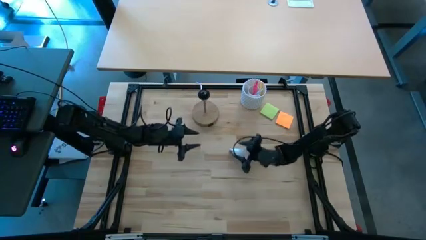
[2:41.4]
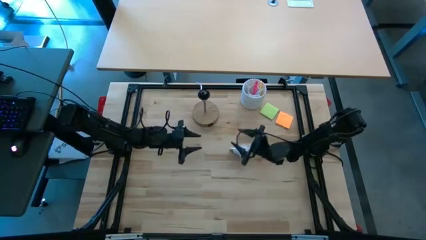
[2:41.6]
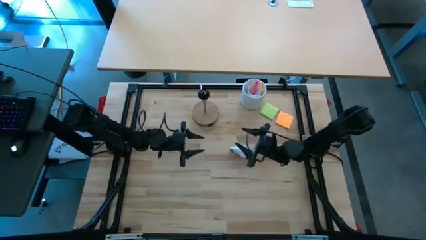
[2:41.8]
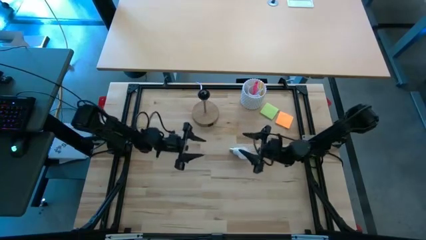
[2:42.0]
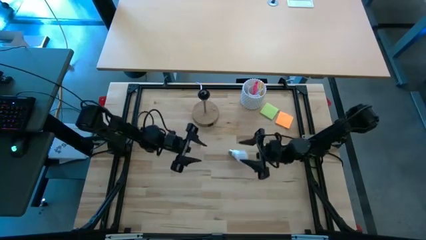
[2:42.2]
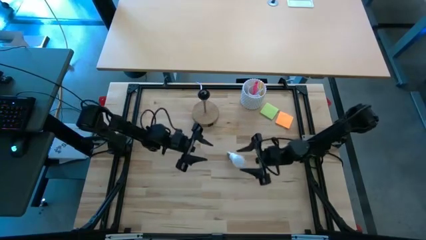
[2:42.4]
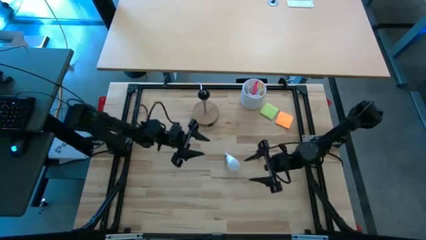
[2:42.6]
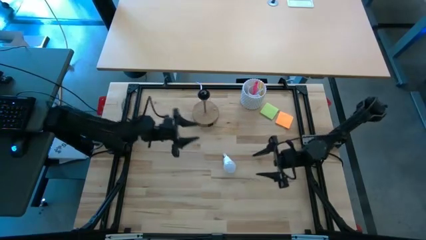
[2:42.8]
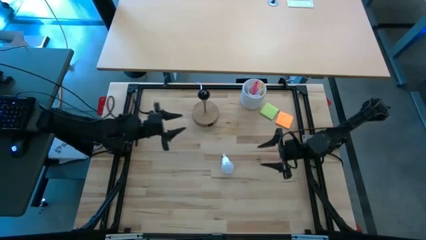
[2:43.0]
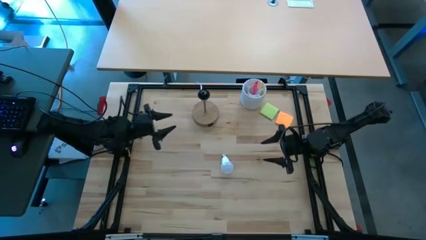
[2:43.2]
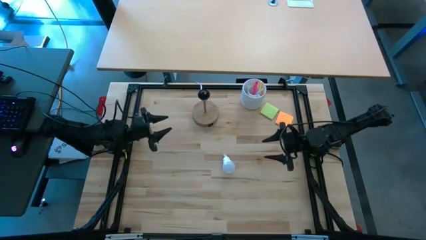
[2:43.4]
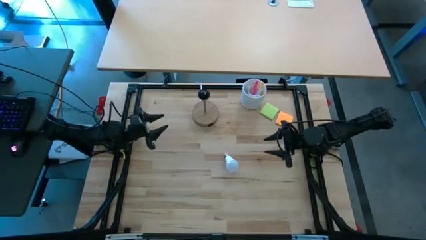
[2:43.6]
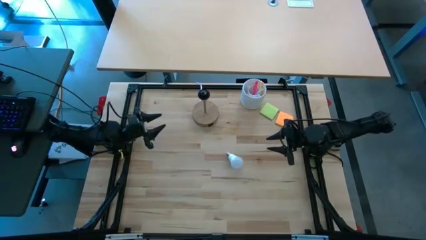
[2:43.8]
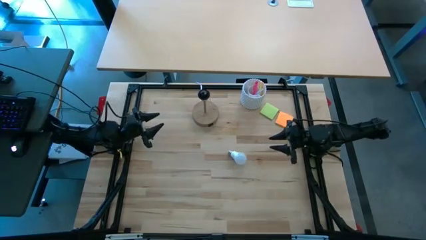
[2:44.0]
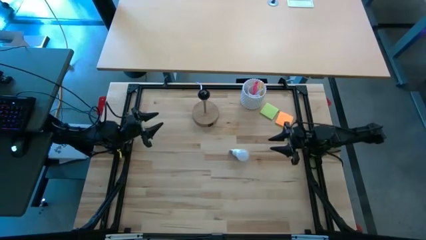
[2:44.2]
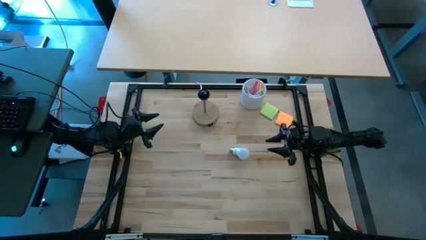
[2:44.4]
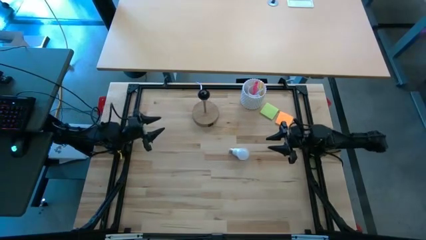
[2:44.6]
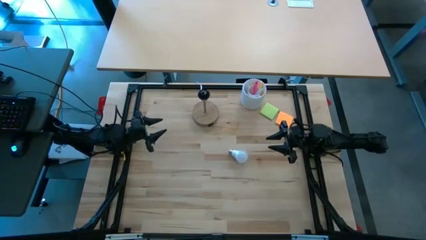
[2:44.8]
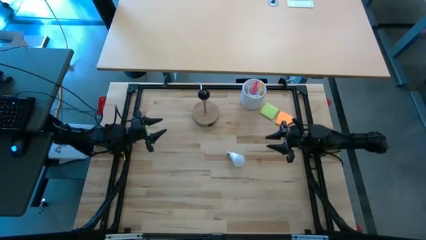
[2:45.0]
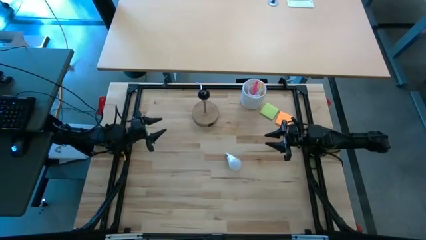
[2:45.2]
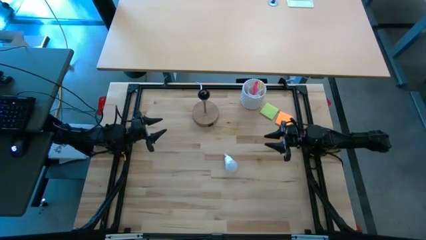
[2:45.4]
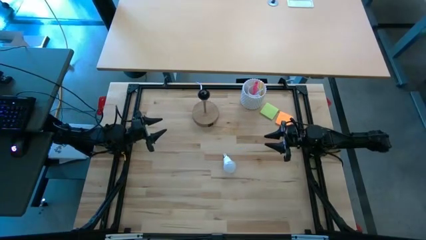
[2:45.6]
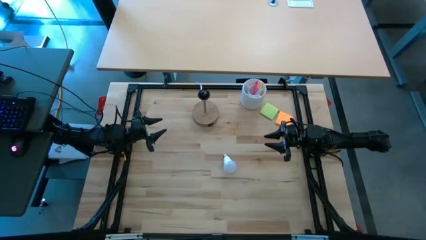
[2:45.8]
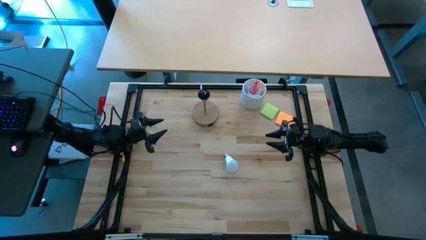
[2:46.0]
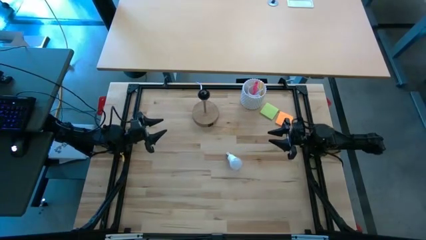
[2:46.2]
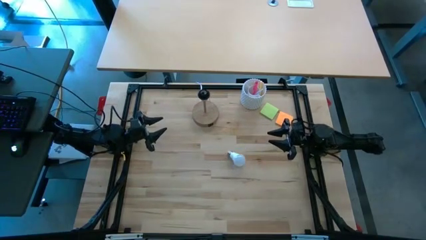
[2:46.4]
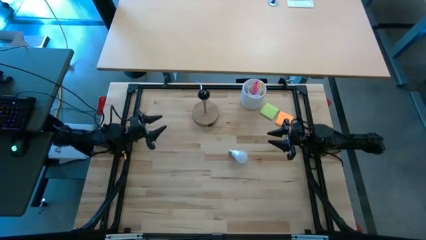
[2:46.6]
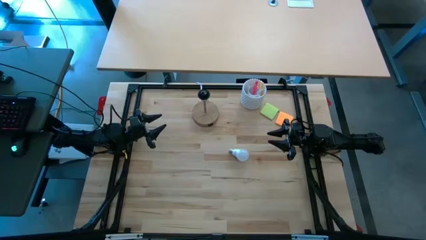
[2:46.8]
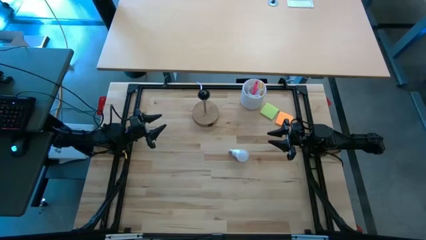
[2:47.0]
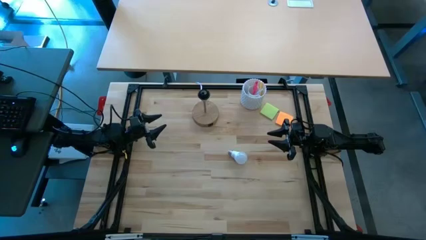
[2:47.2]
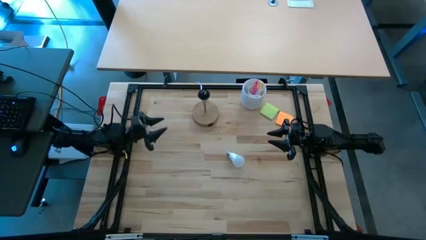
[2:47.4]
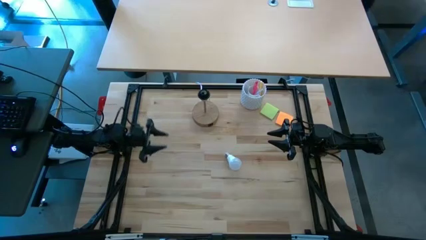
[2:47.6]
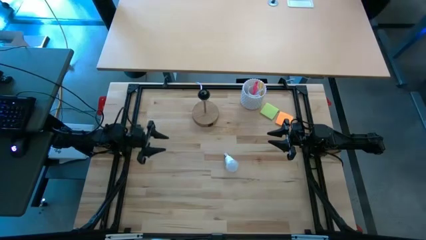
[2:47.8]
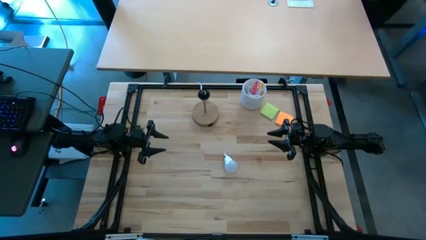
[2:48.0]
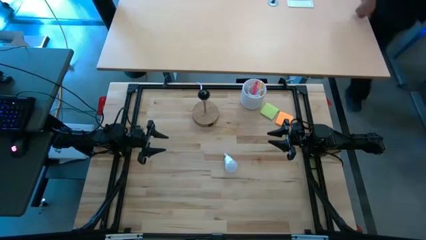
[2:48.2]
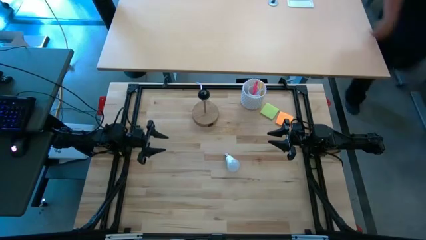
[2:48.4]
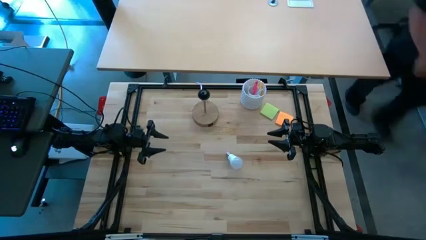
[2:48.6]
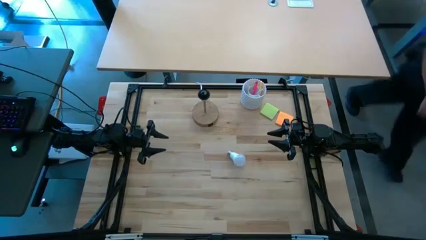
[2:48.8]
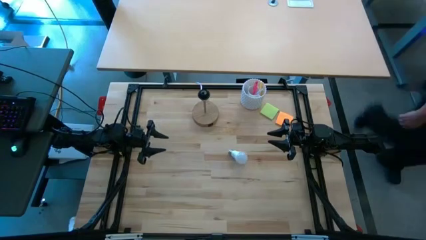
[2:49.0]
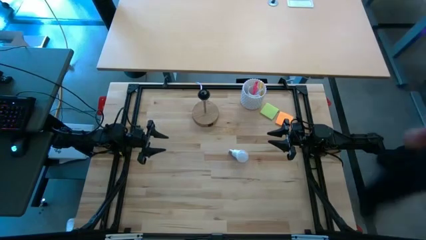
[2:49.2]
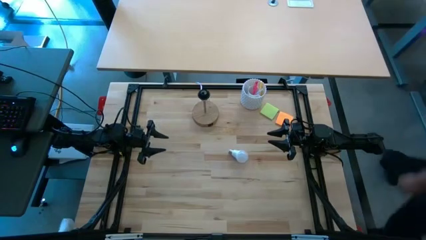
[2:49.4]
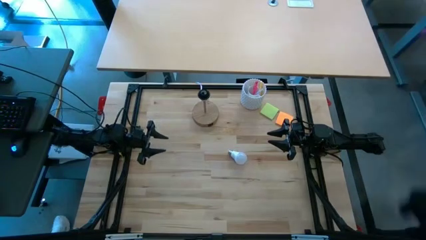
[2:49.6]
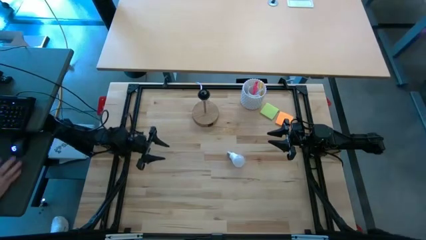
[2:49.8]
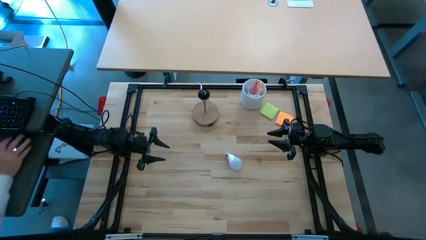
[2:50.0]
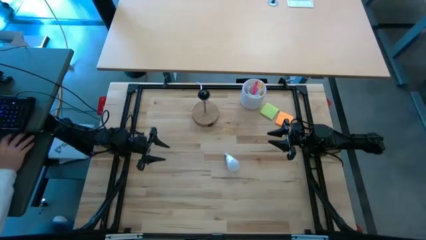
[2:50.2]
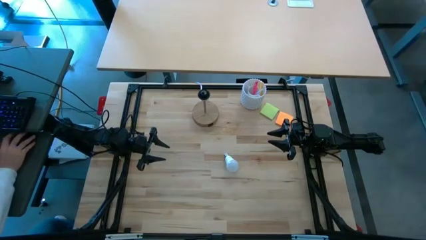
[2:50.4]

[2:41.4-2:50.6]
Task: Screw lightbulb
Return to Home Position

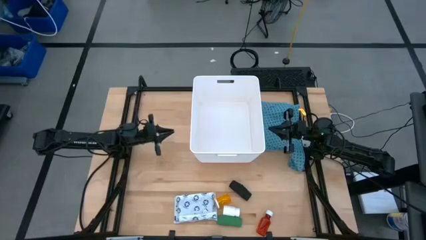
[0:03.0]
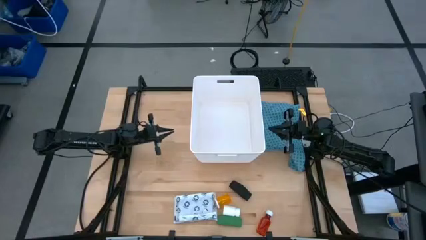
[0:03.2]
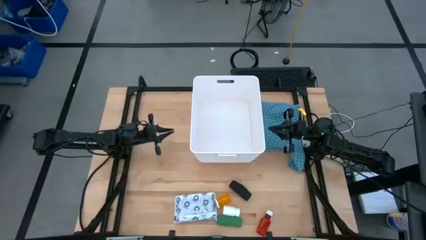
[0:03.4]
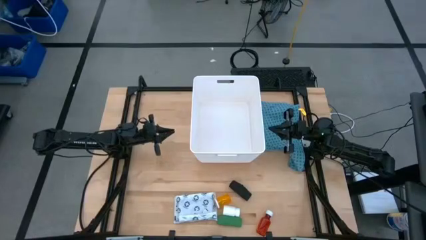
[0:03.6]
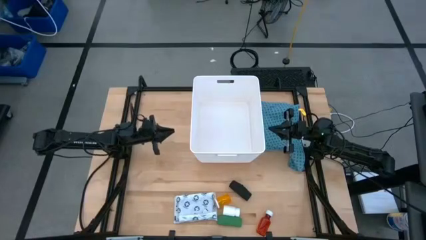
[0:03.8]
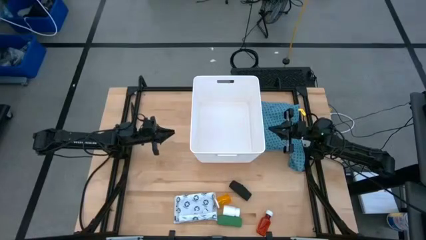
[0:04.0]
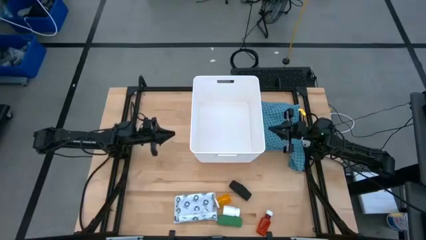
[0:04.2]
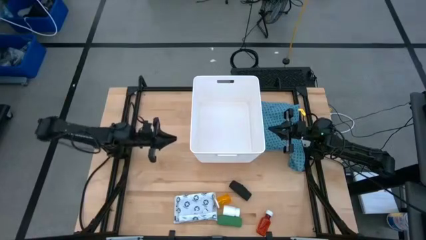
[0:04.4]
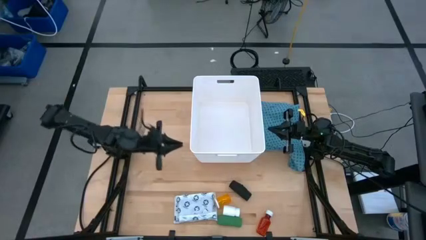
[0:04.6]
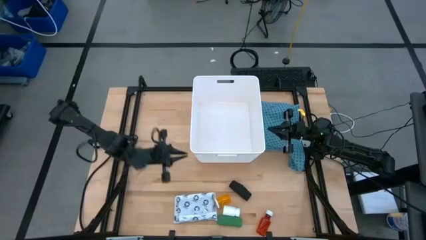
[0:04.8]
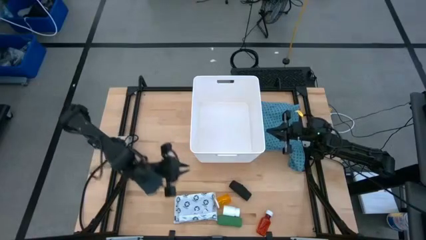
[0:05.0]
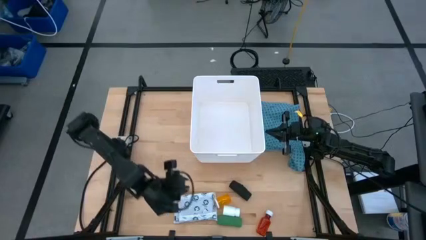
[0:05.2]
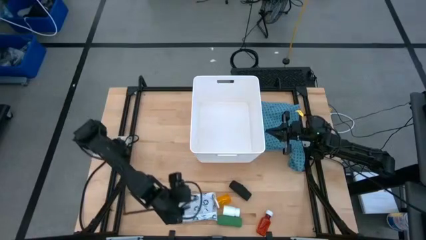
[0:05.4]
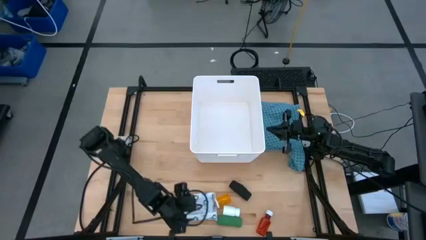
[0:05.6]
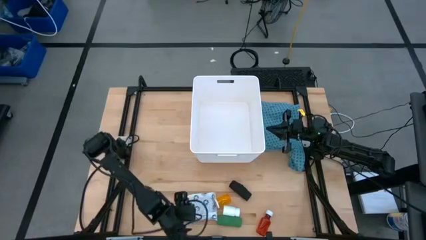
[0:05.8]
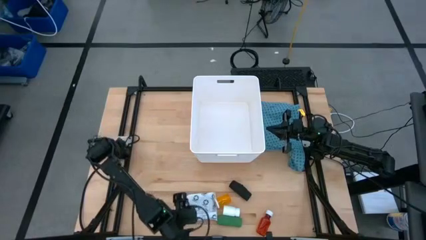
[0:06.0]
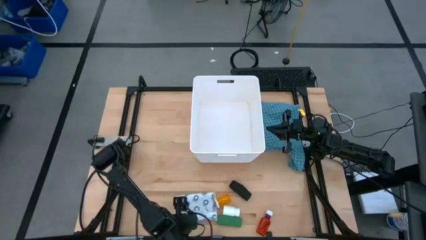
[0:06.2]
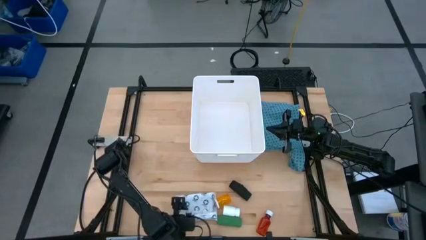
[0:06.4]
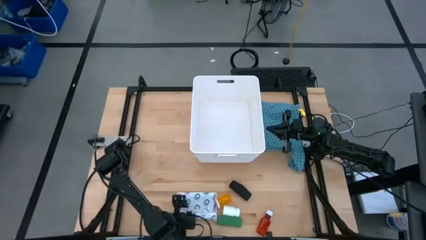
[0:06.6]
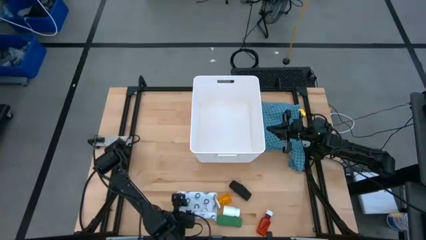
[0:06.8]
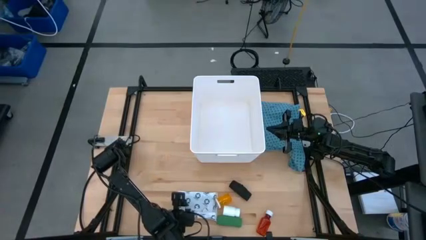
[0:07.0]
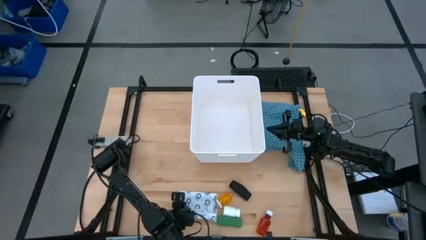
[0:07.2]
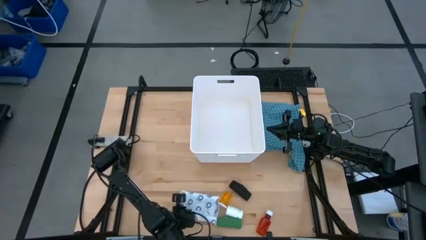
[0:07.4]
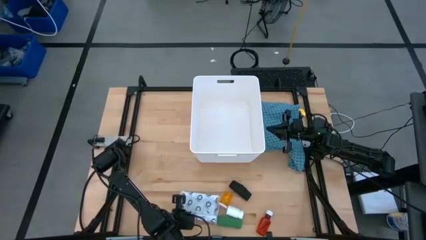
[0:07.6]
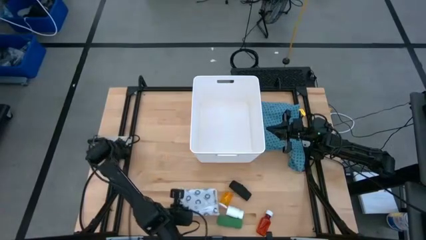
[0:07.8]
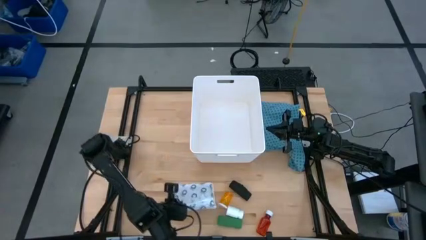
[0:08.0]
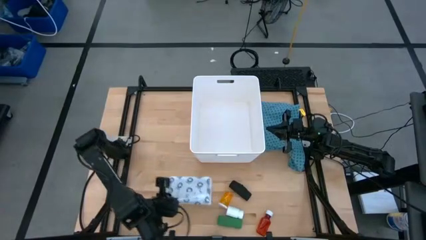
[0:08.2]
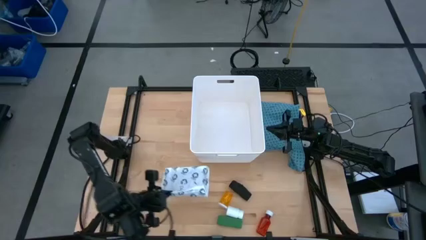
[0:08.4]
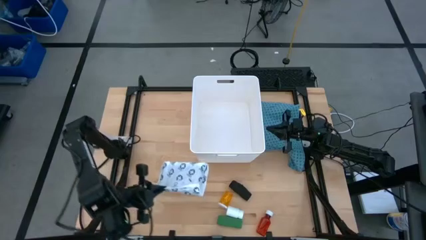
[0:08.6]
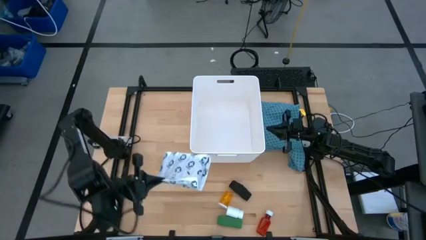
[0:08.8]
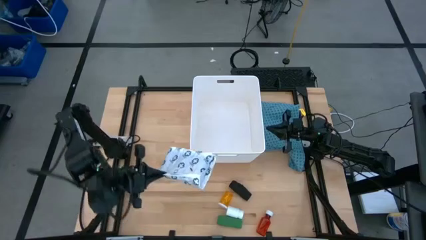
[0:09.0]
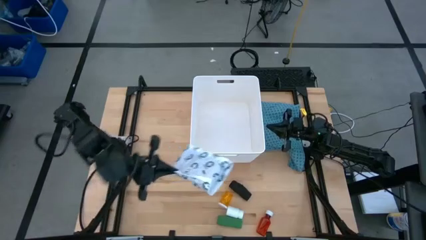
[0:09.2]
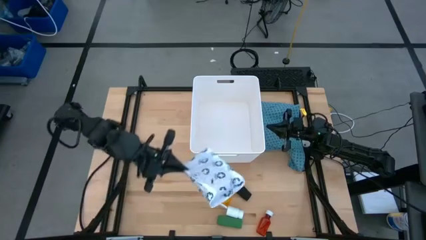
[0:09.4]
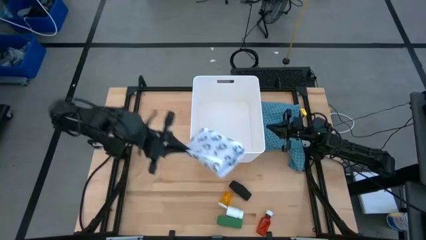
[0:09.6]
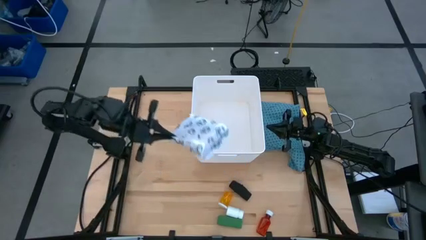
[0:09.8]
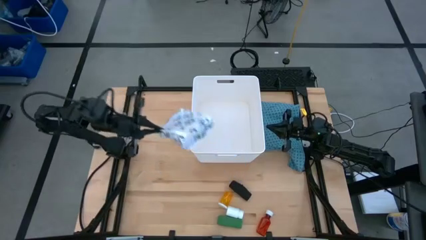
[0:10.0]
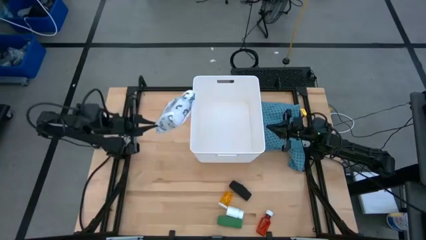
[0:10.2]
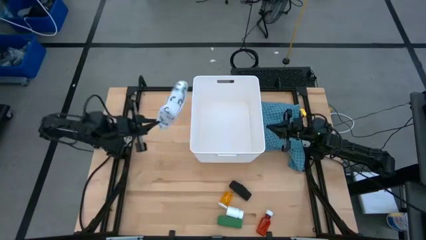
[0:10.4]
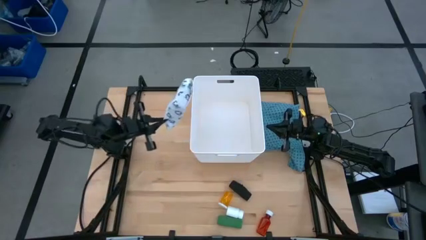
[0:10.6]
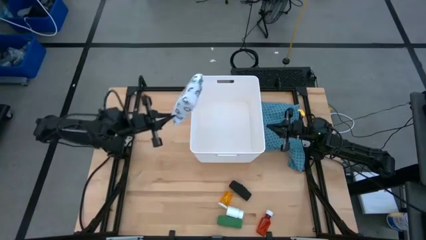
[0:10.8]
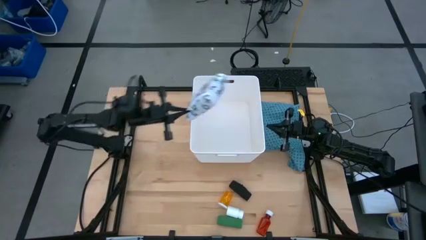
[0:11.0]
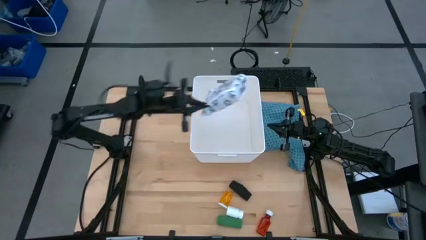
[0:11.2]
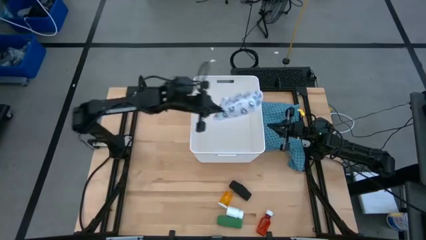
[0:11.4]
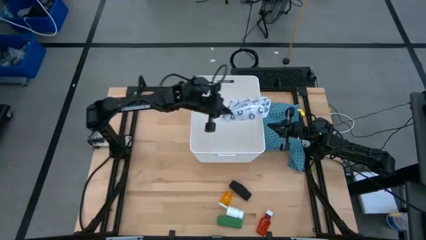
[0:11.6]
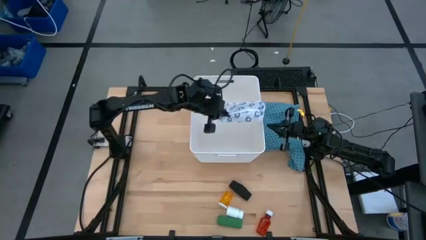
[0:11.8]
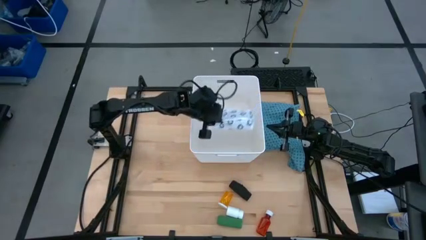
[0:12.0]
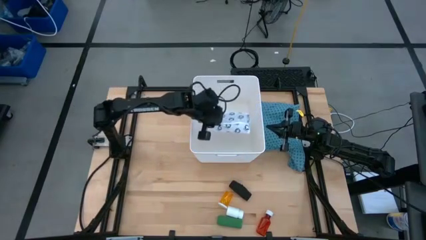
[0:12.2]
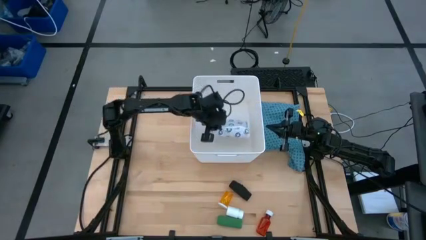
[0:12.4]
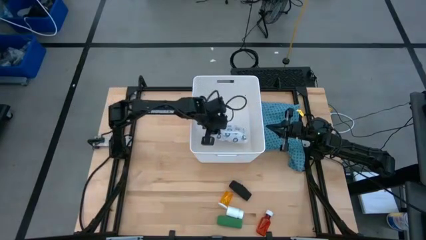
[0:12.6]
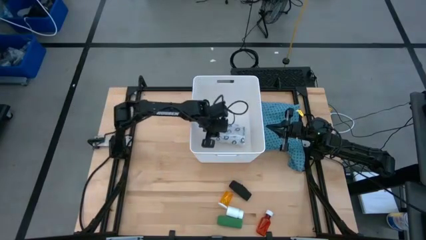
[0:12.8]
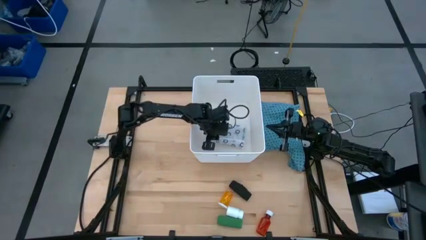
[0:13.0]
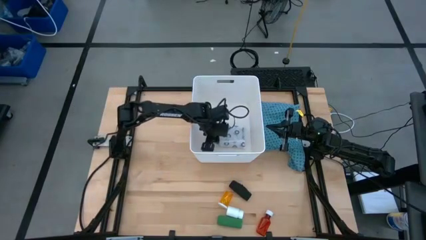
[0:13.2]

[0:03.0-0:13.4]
Task: Pick & place medical supplies in basket/bin
Put the white mailer bag into the white bin
